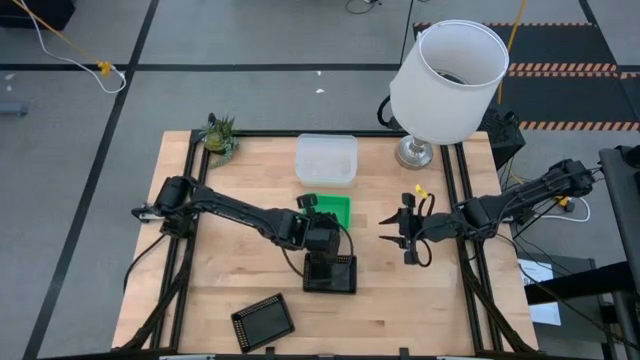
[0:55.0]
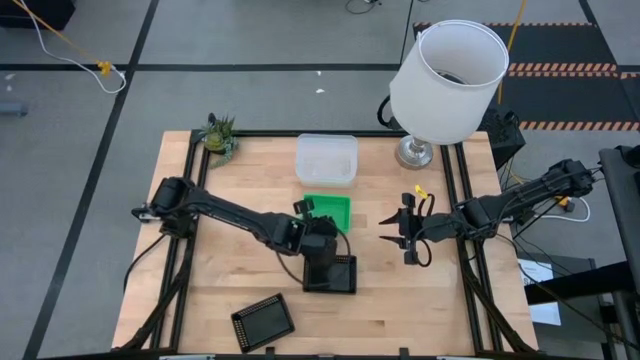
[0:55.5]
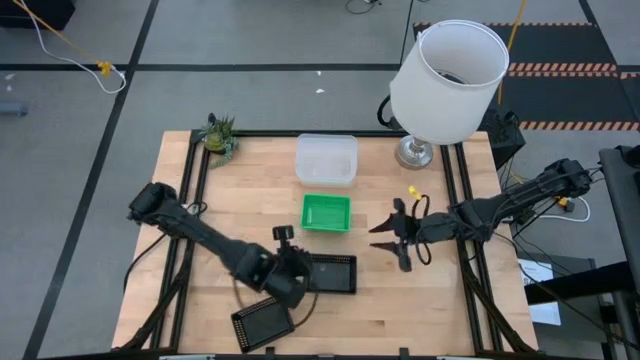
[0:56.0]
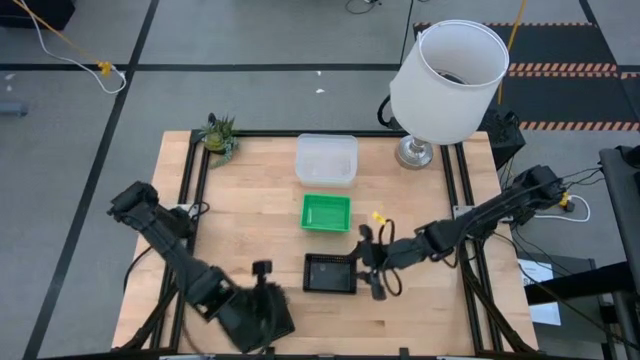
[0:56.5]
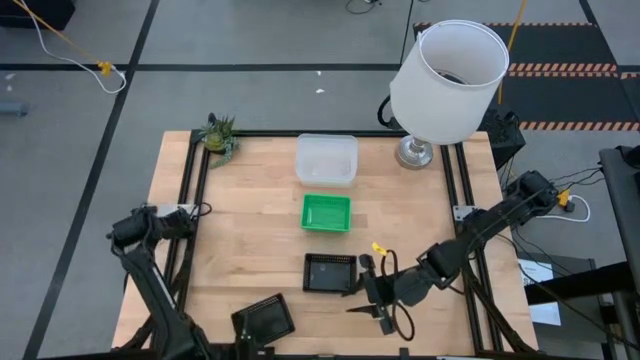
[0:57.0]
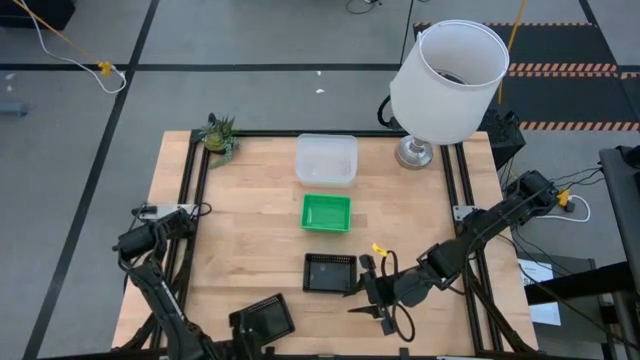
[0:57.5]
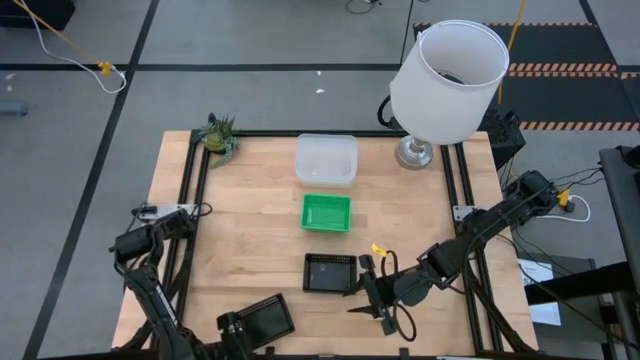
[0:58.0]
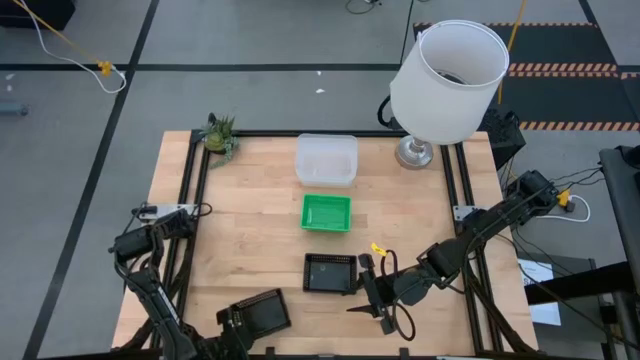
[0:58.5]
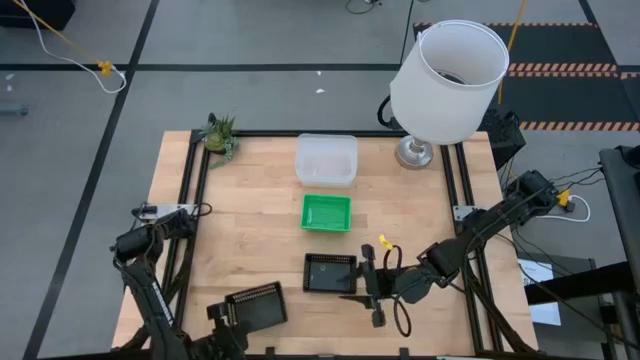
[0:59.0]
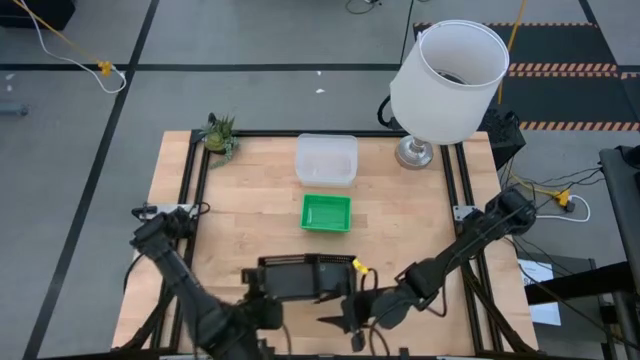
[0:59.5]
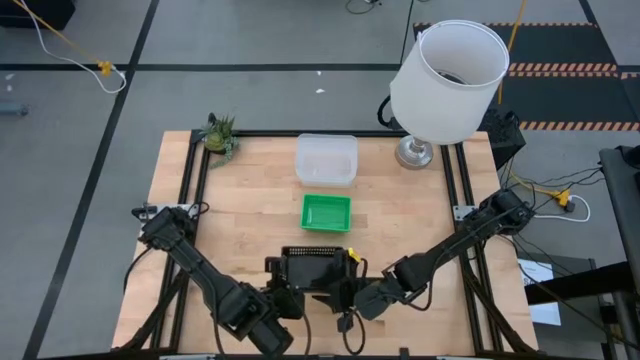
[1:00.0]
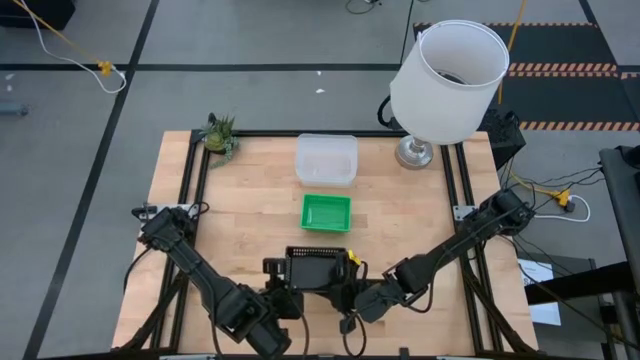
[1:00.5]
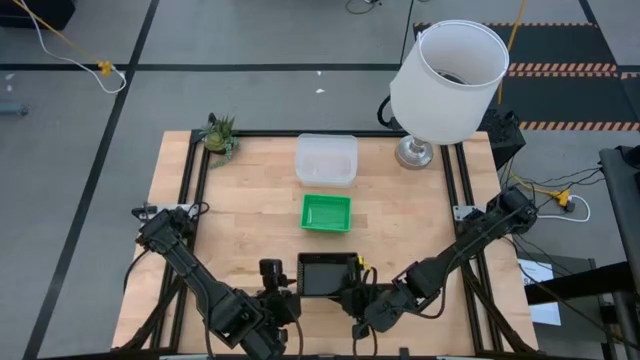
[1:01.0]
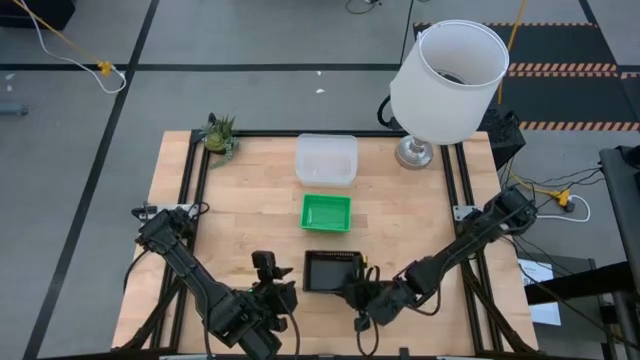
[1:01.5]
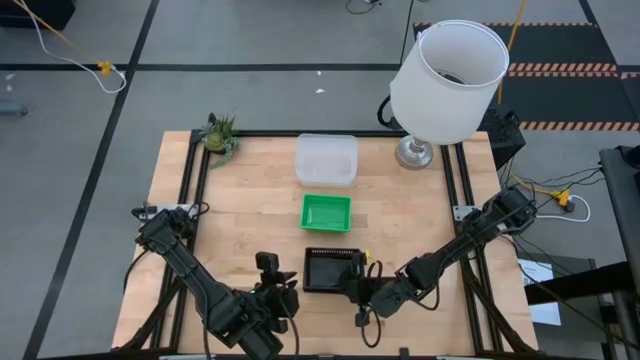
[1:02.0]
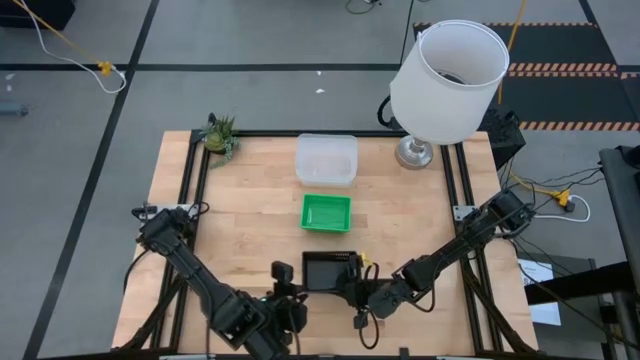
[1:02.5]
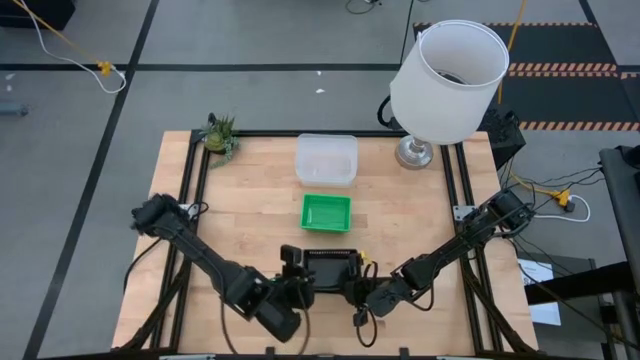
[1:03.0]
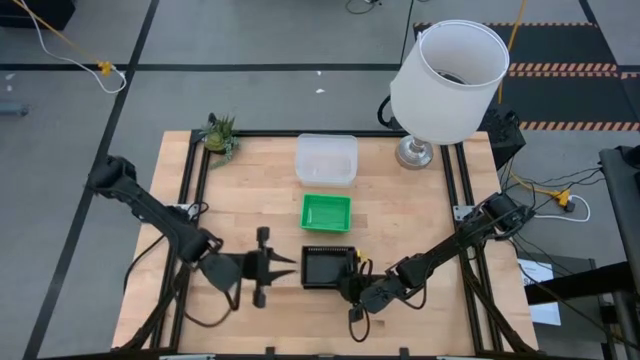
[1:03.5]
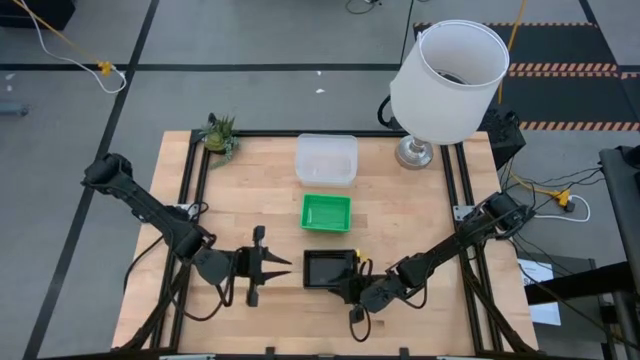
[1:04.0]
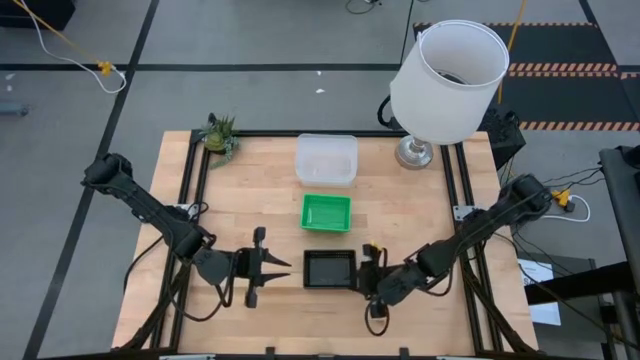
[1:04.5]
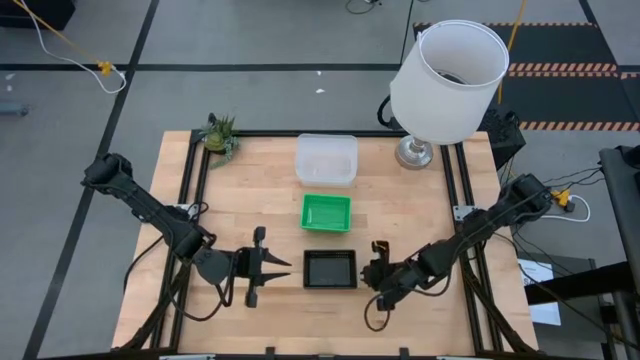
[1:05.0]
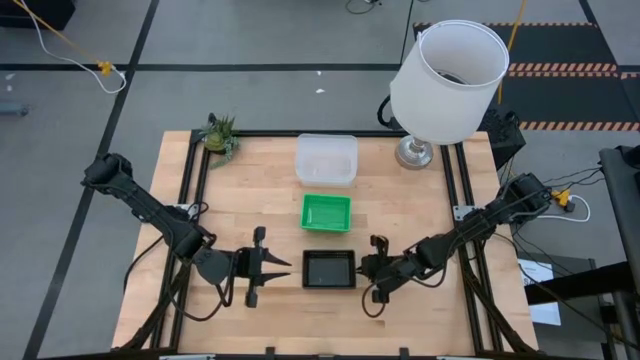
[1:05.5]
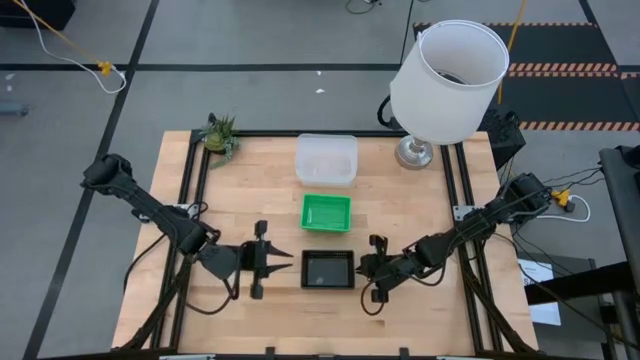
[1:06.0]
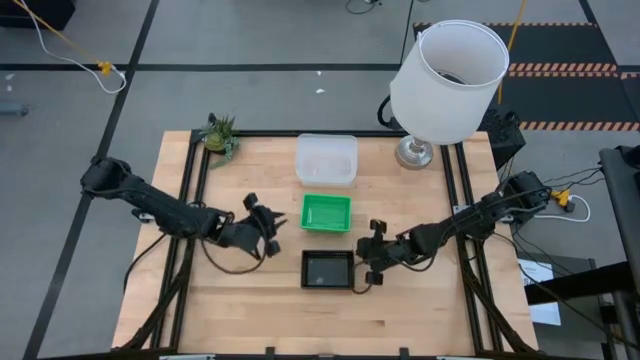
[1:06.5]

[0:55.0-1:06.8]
Stack the left black bin on top of the right black bins

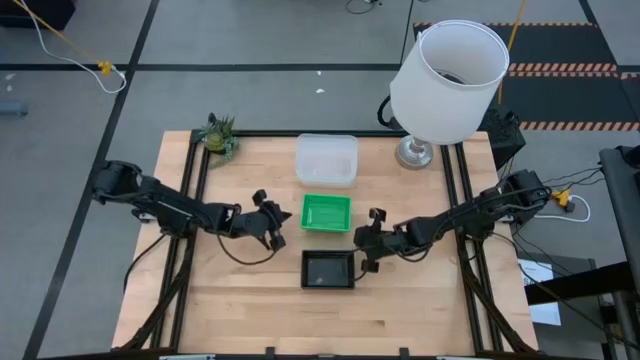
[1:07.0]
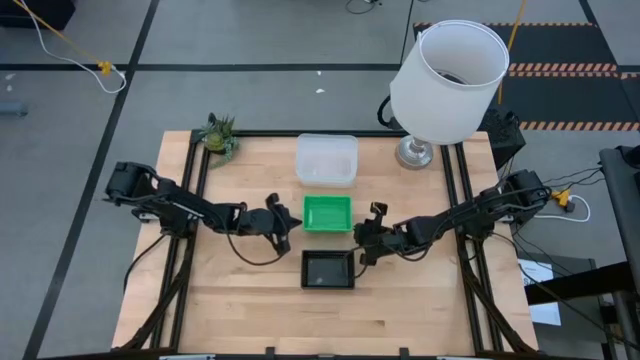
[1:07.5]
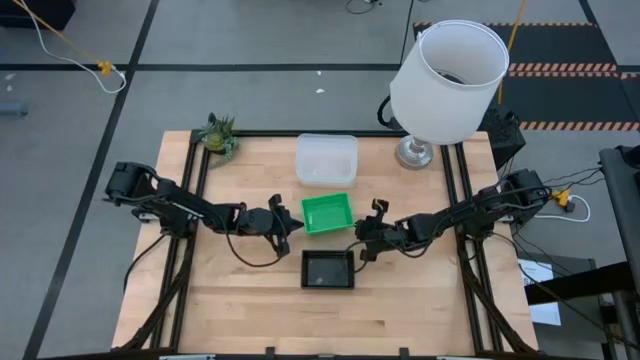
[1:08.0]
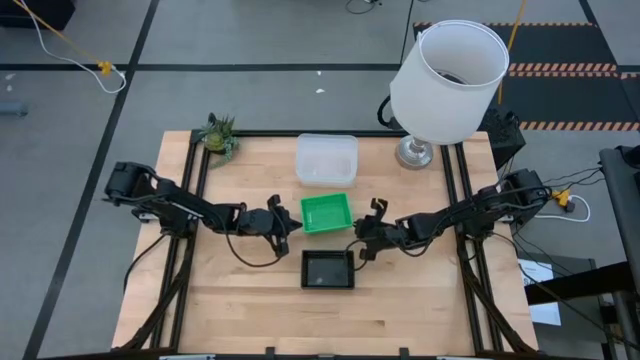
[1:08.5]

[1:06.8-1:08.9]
Adjust the stacked green bins
